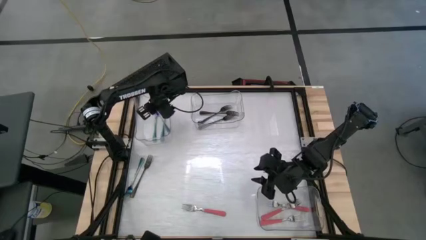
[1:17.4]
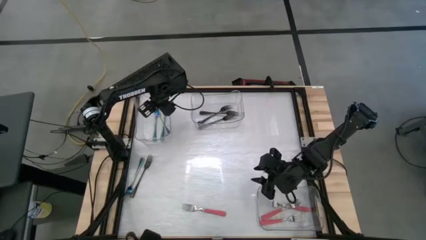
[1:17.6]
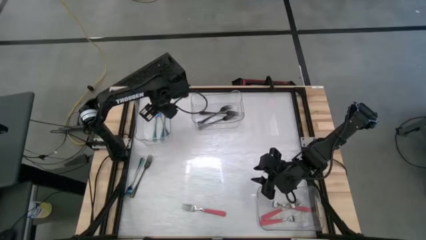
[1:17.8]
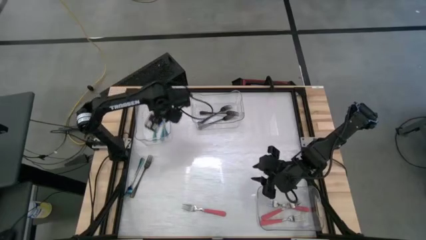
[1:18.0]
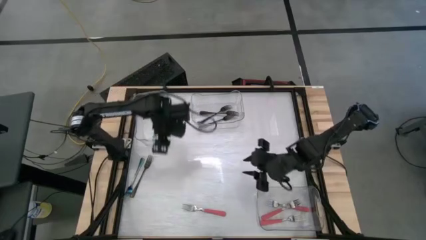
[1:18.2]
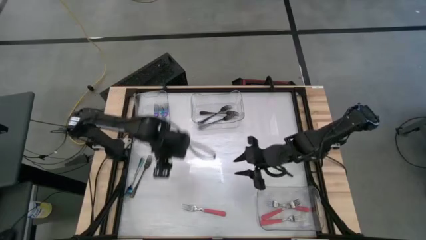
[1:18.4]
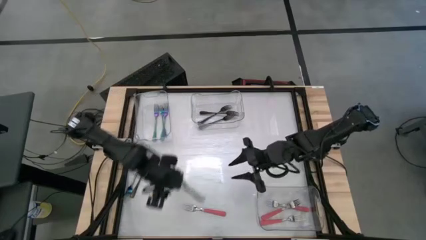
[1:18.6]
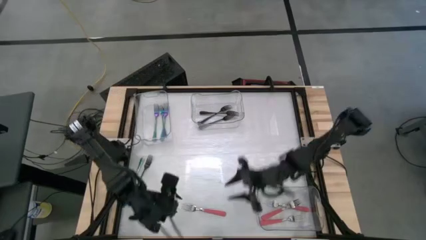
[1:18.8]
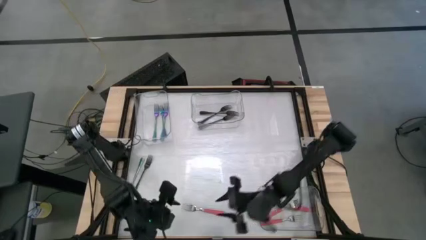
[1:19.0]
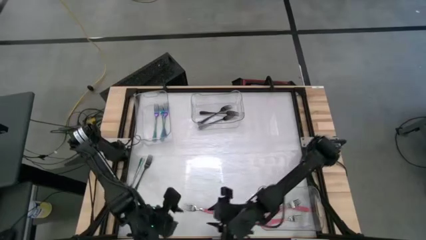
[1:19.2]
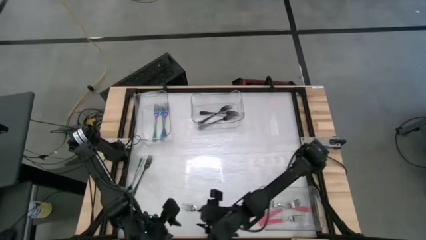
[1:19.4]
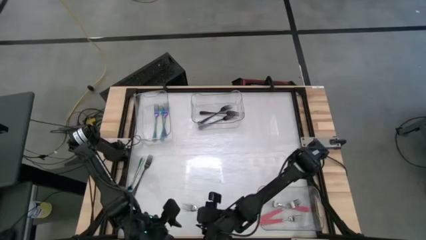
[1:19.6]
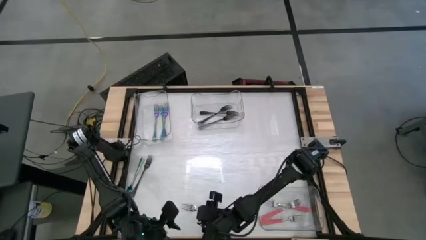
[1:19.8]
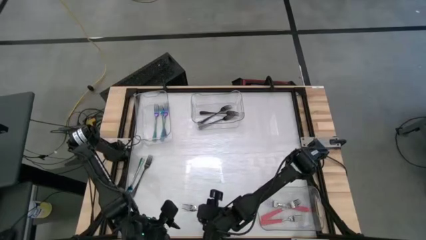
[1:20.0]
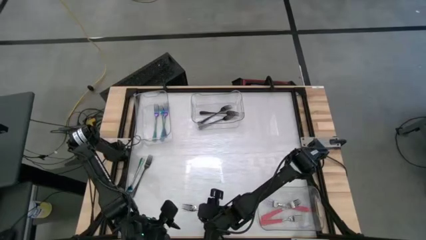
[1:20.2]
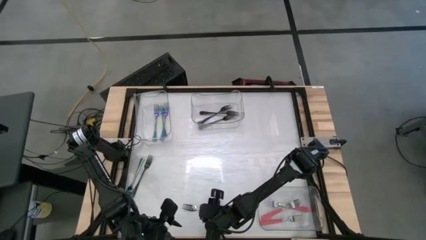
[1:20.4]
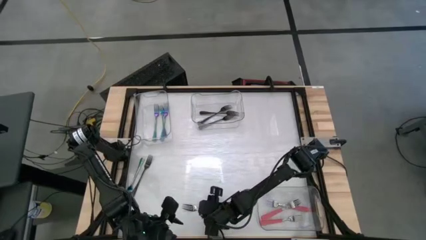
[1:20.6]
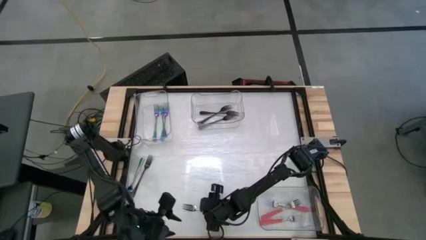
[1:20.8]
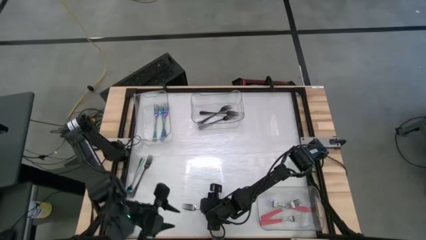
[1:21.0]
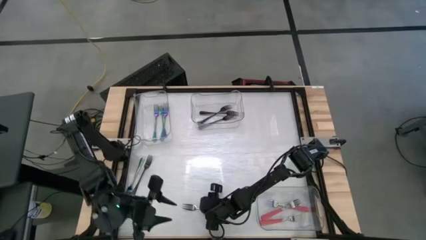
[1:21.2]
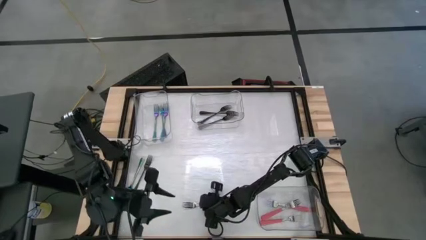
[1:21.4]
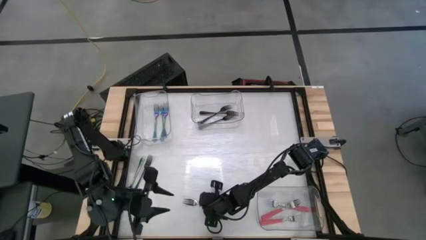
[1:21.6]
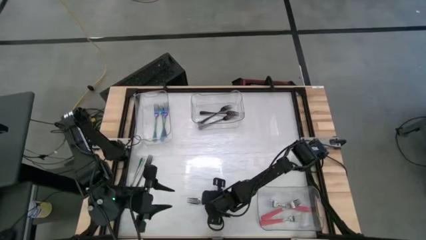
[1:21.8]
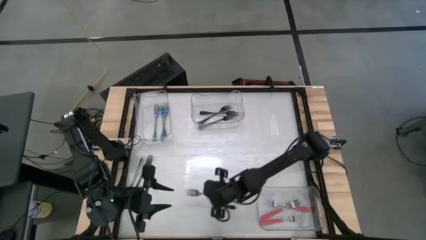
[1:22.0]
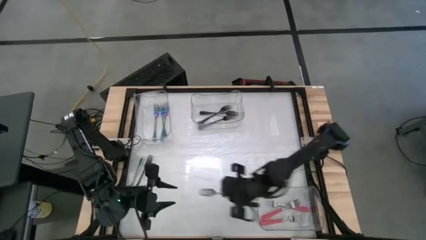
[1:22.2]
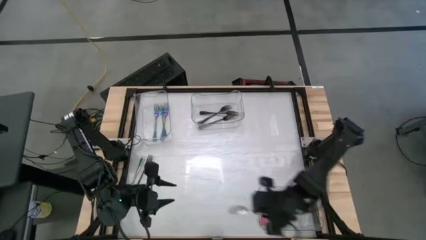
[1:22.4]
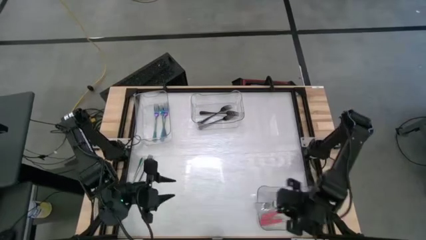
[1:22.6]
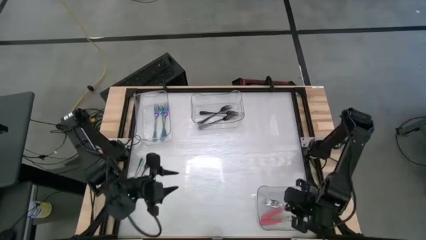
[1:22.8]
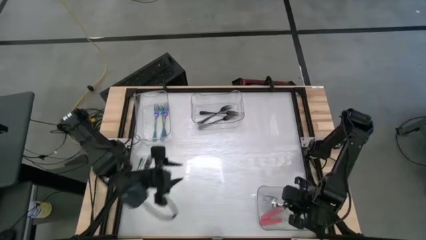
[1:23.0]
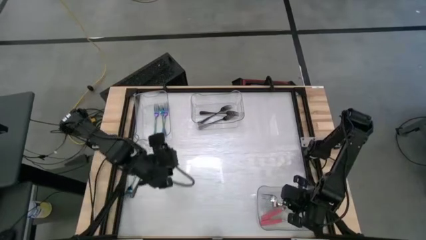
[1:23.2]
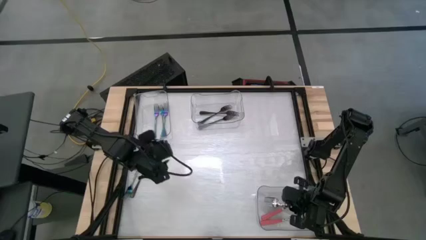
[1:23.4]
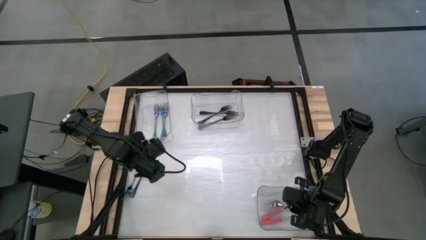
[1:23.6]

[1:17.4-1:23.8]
Task: Sort silverware by color (type)
Put the pink fork into the bottom right transparent bin

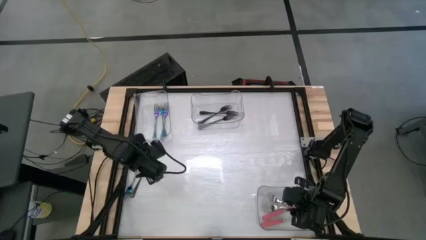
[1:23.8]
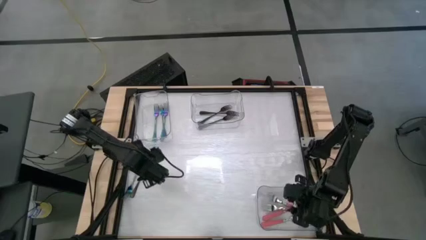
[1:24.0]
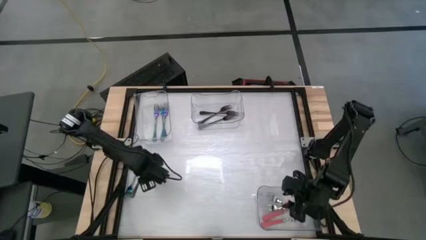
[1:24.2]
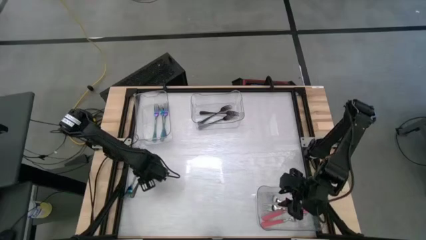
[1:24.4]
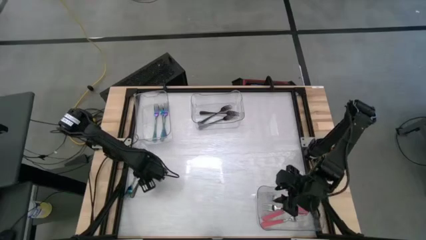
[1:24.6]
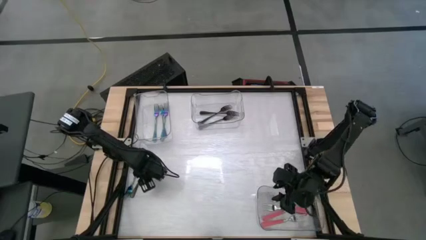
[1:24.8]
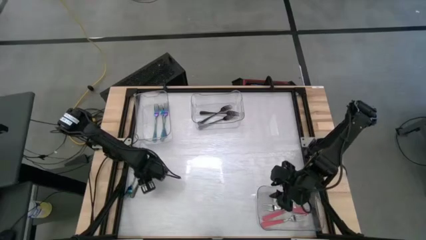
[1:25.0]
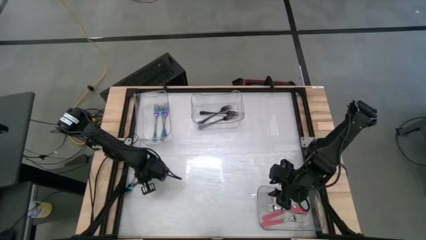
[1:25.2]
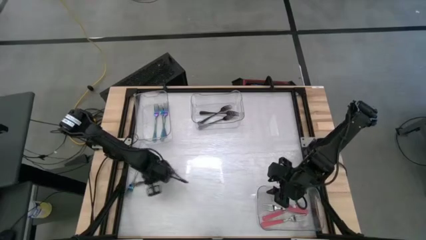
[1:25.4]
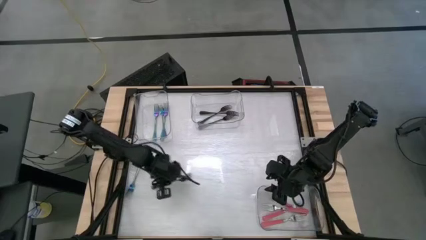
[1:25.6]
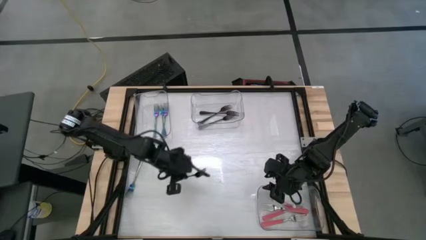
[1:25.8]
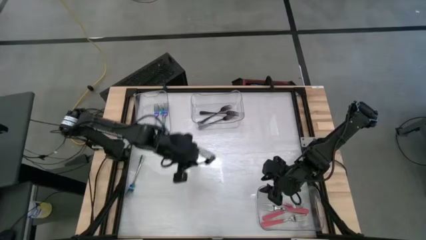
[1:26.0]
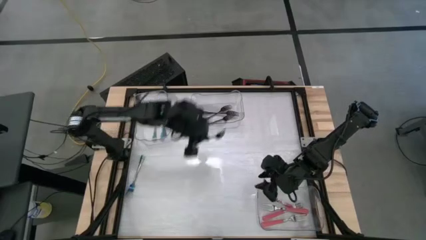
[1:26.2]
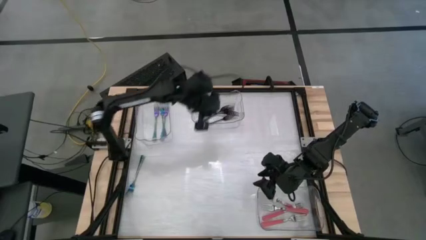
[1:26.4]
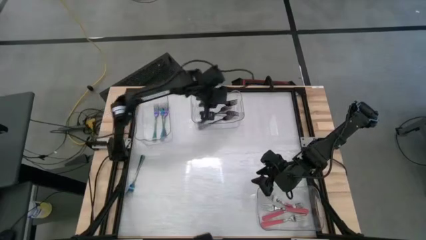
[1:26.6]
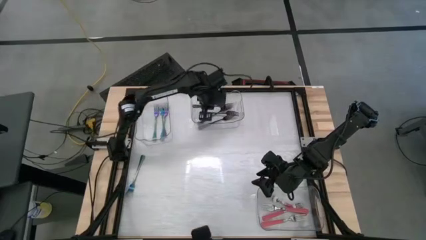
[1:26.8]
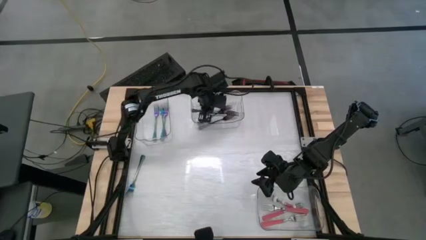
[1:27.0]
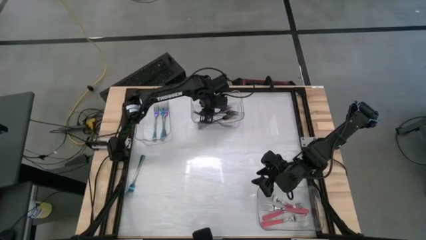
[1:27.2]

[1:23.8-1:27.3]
Put the black fork into the top right transparent bin

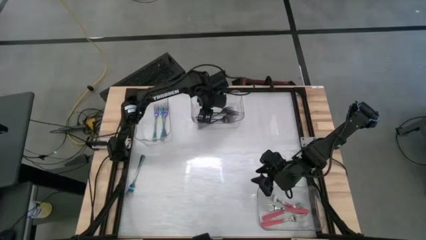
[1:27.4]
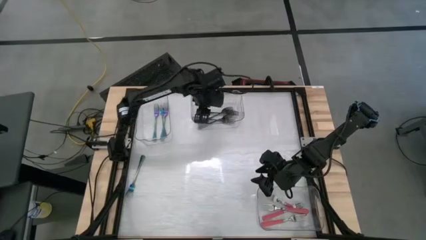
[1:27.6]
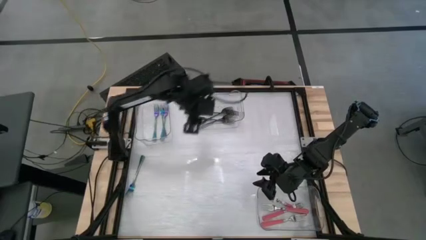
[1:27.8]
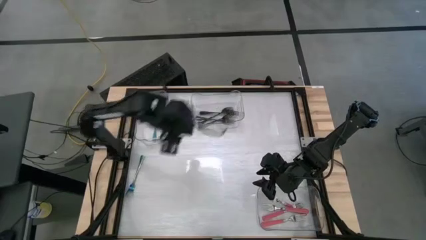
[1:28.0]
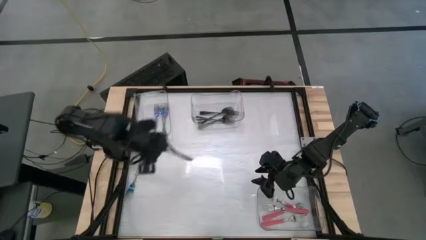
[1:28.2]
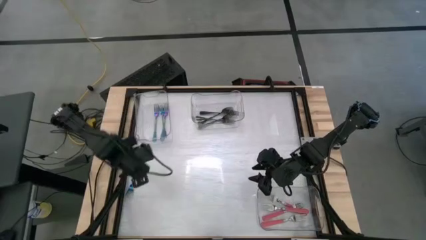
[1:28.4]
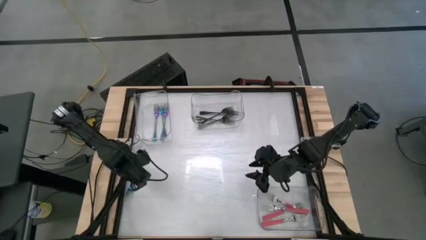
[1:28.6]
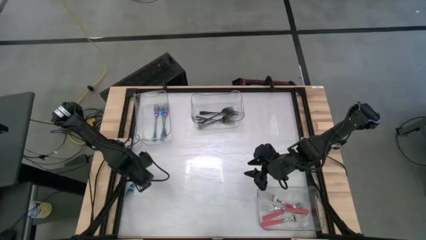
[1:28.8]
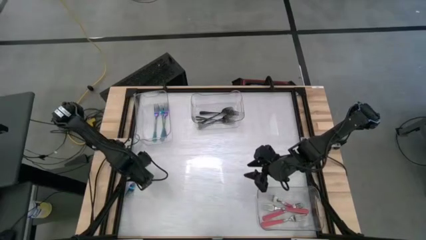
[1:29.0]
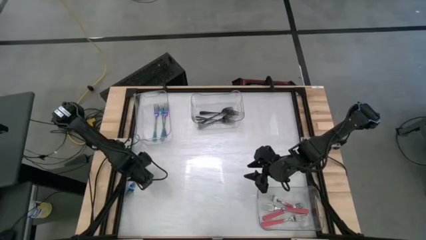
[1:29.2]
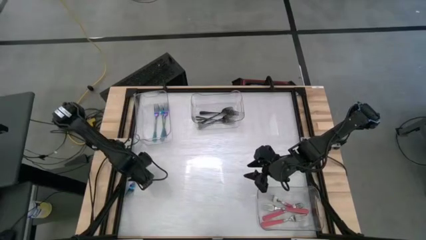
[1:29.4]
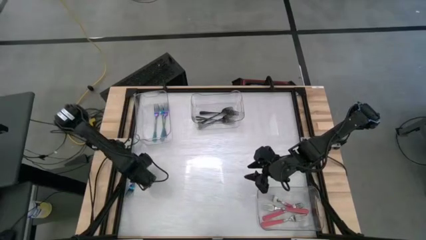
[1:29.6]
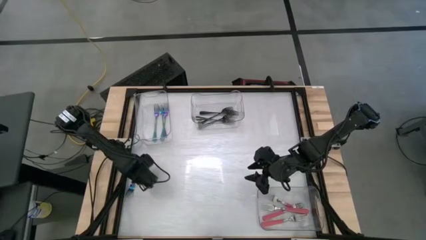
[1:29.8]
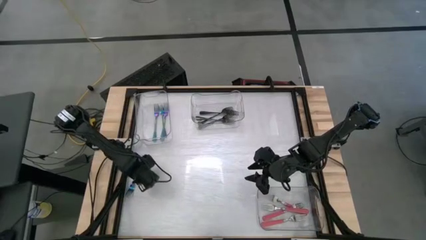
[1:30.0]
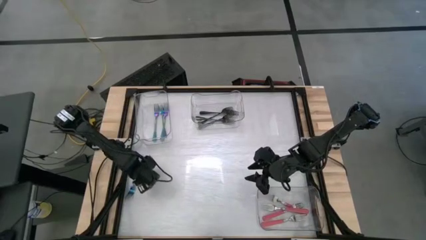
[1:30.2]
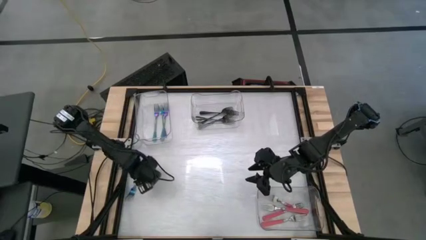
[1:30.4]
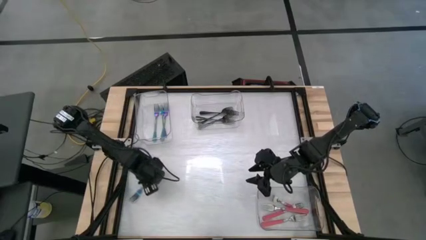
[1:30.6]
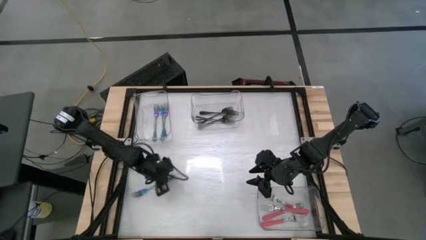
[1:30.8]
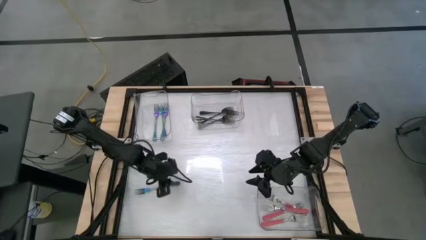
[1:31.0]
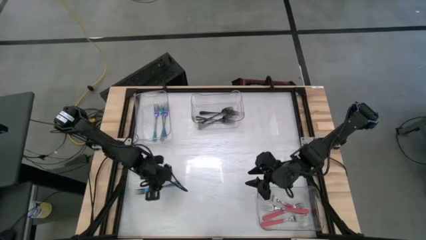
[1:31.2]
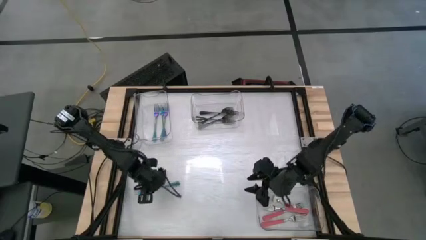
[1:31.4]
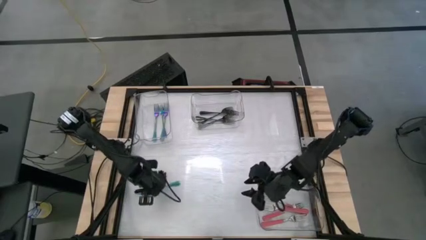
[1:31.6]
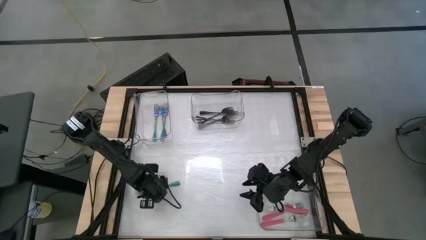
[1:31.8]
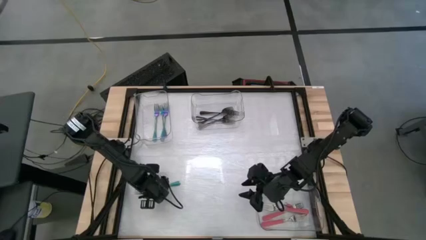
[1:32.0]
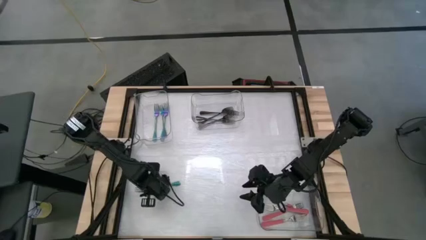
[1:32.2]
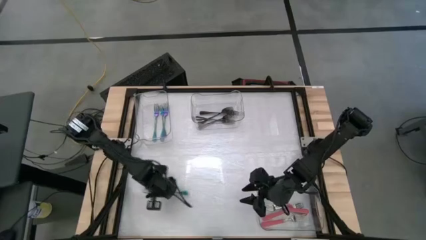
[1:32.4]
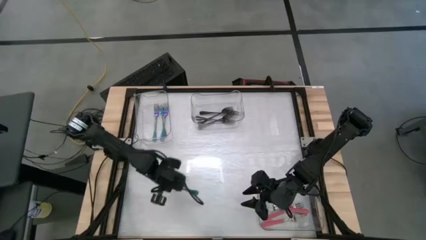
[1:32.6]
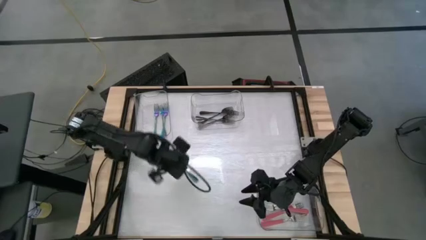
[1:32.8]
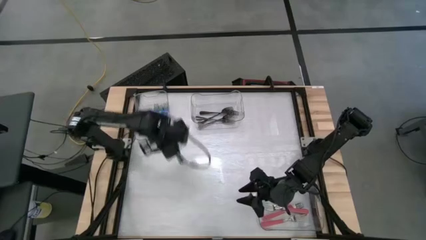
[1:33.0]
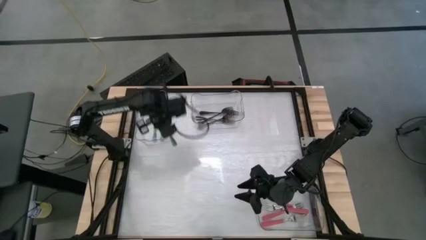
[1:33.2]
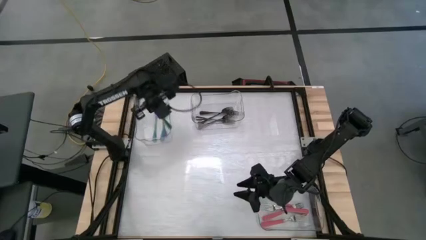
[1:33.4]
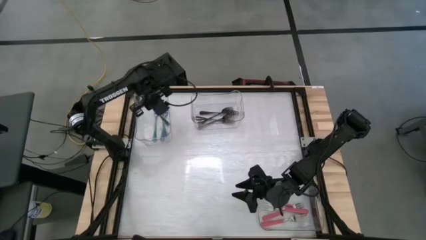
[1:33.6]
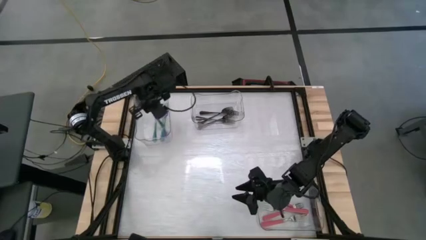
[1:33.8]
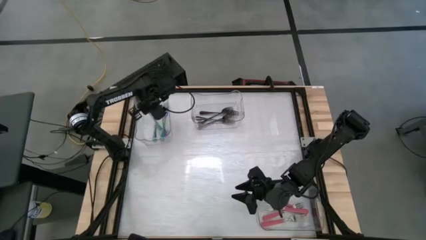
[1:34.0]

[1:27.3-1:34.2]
Put the purple fork into the top left transparent bin
